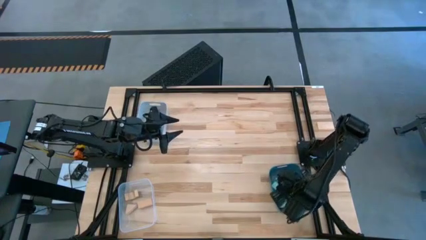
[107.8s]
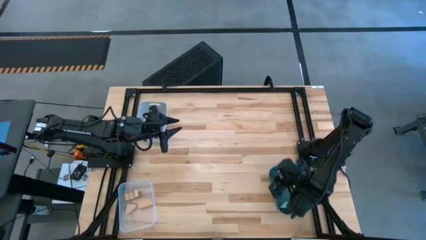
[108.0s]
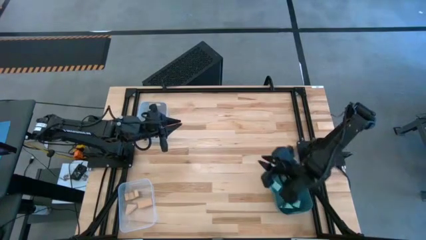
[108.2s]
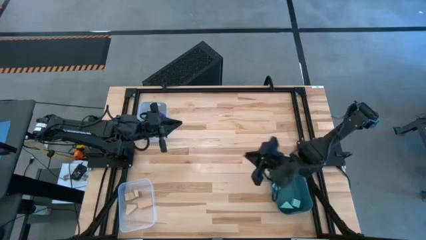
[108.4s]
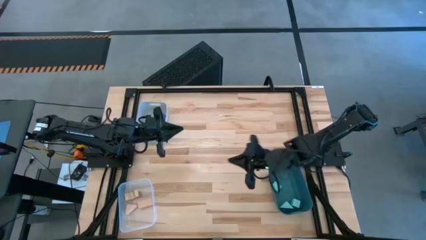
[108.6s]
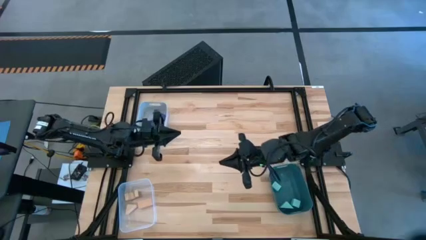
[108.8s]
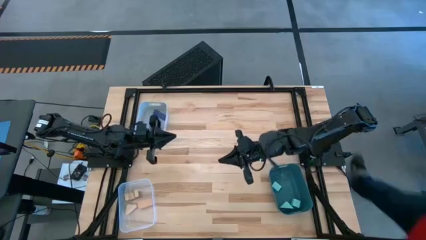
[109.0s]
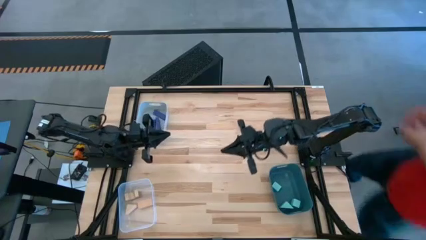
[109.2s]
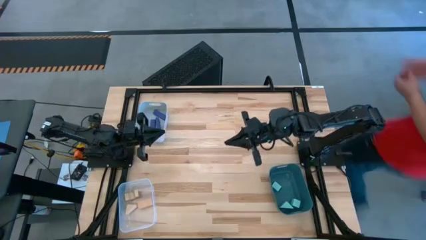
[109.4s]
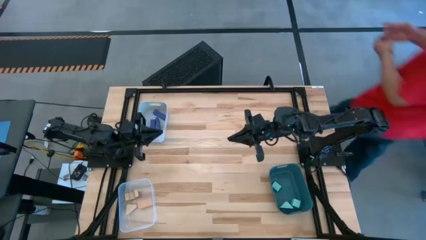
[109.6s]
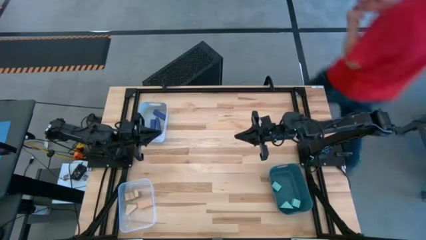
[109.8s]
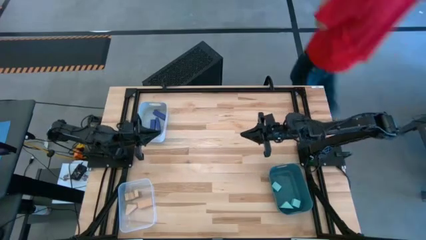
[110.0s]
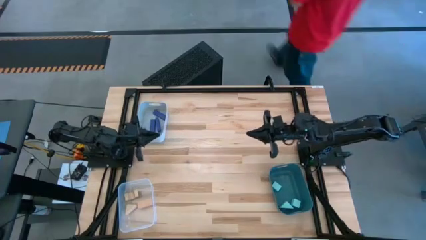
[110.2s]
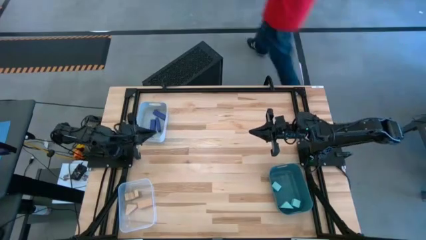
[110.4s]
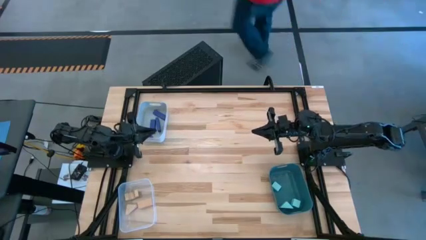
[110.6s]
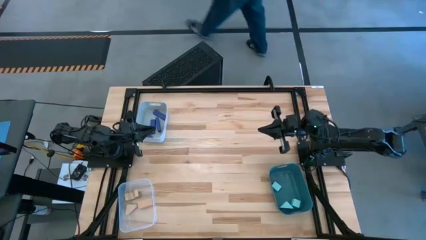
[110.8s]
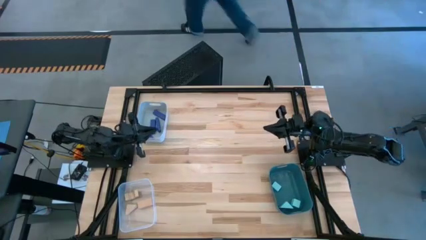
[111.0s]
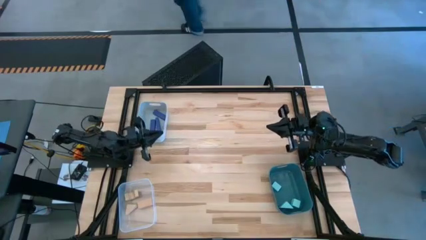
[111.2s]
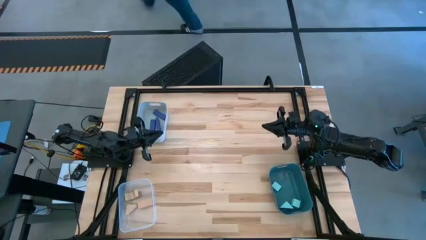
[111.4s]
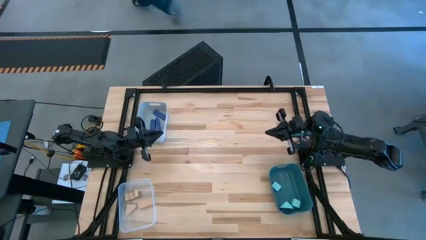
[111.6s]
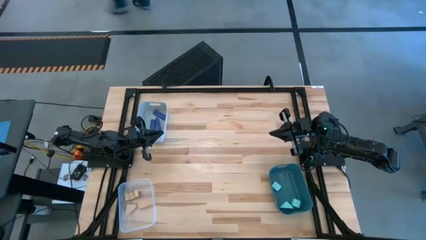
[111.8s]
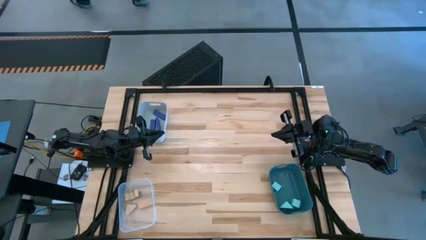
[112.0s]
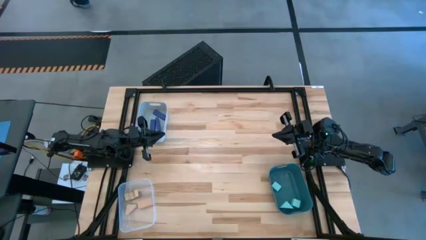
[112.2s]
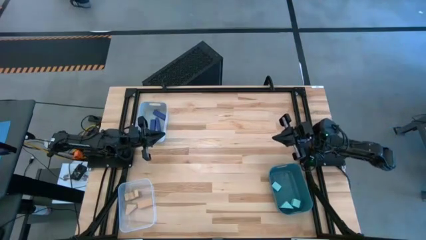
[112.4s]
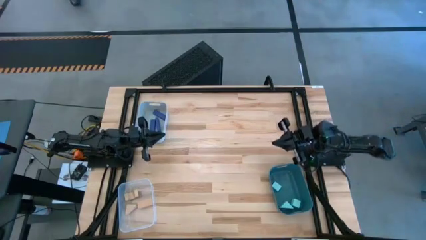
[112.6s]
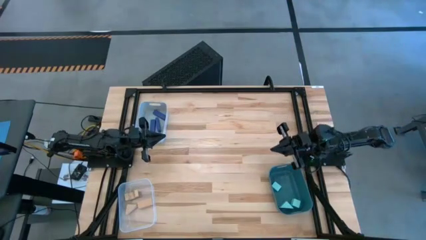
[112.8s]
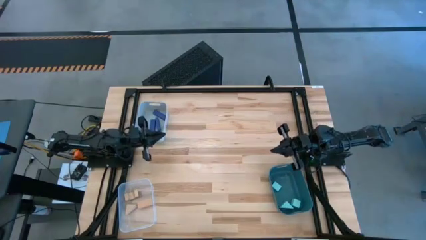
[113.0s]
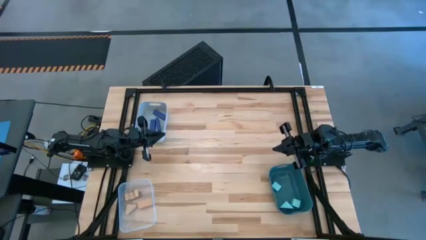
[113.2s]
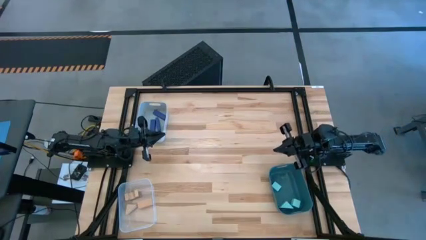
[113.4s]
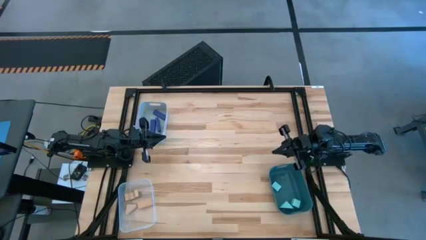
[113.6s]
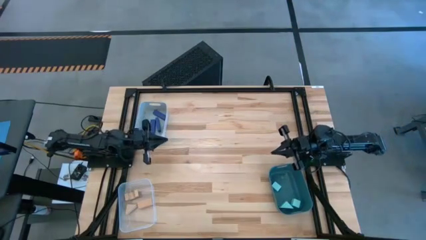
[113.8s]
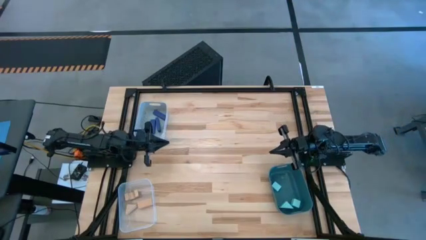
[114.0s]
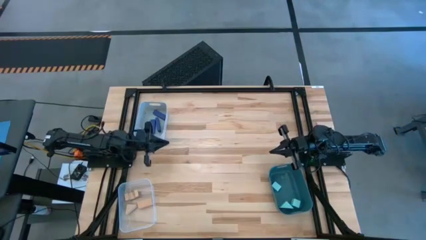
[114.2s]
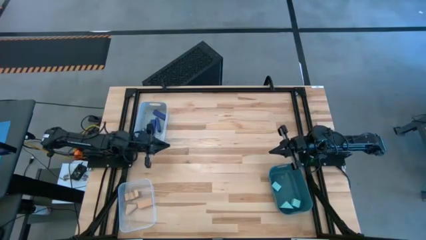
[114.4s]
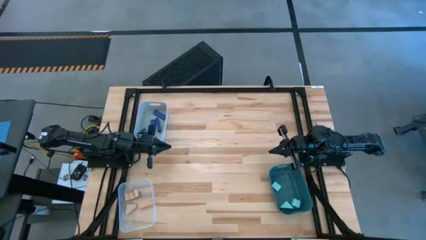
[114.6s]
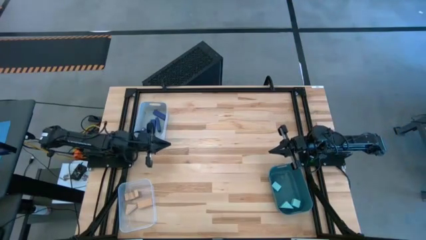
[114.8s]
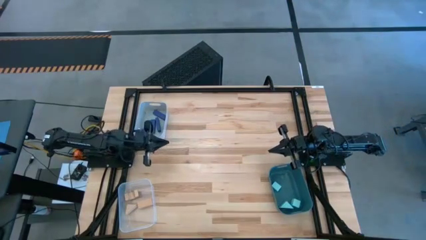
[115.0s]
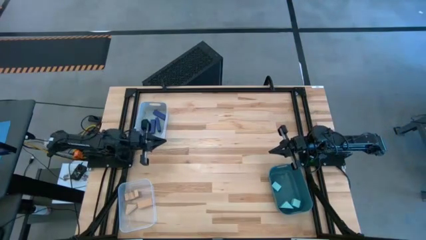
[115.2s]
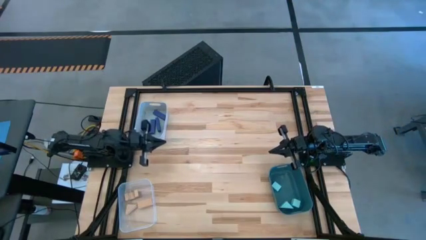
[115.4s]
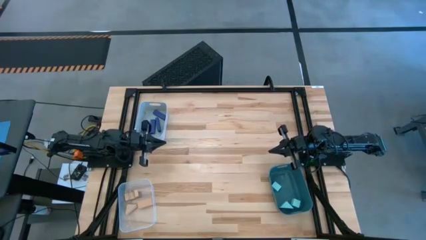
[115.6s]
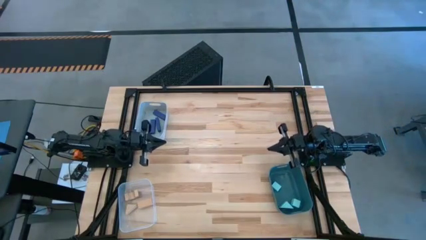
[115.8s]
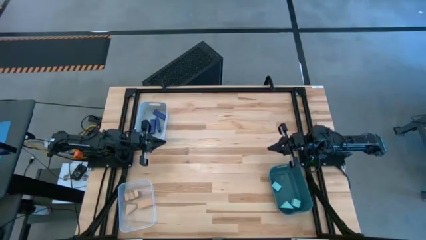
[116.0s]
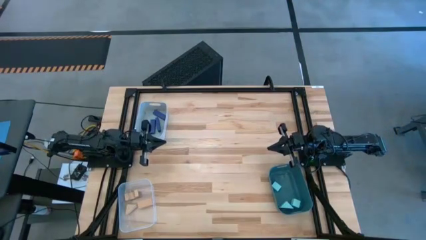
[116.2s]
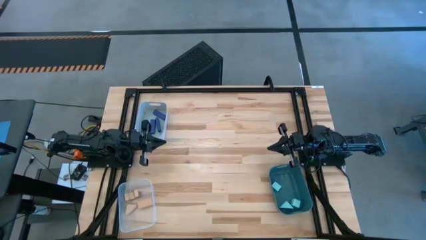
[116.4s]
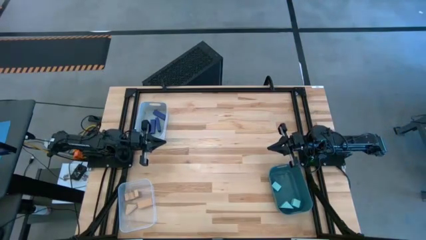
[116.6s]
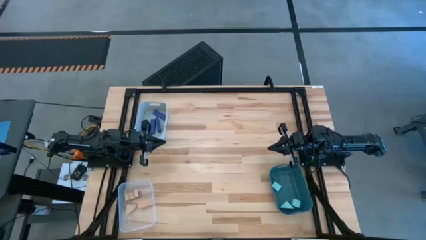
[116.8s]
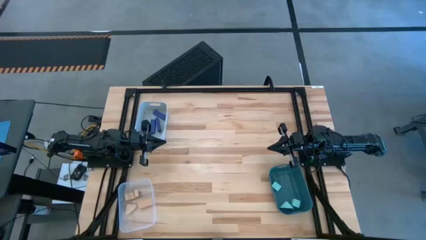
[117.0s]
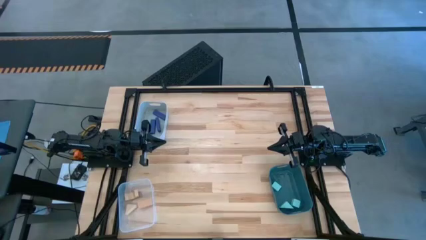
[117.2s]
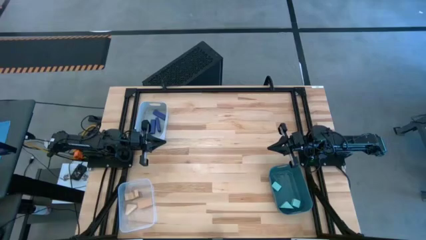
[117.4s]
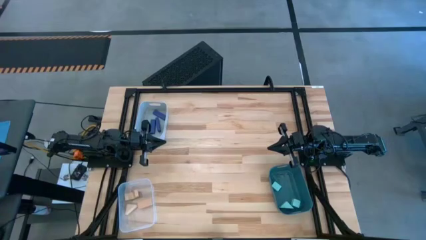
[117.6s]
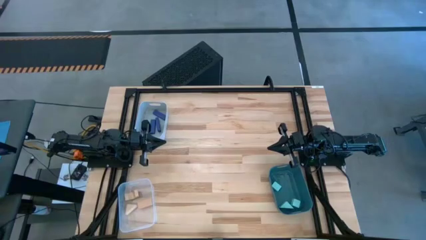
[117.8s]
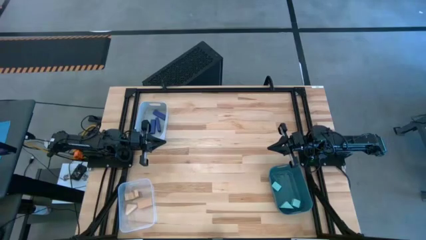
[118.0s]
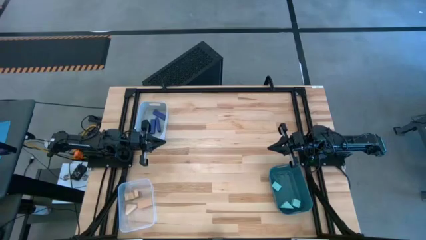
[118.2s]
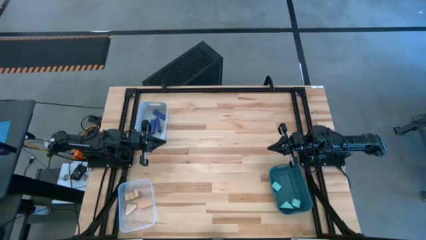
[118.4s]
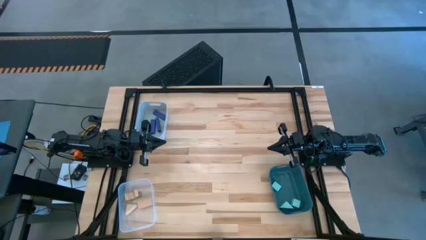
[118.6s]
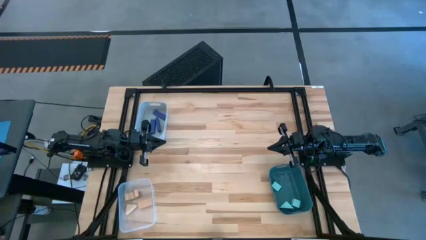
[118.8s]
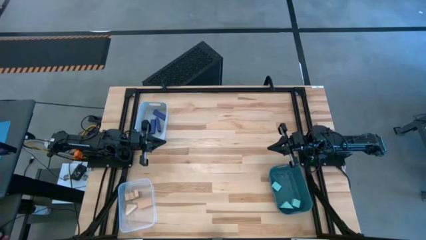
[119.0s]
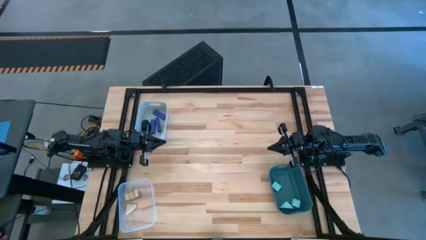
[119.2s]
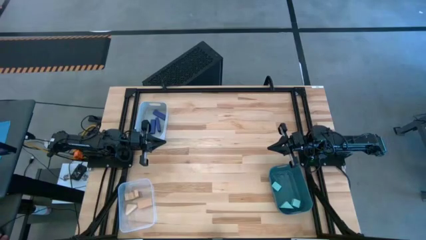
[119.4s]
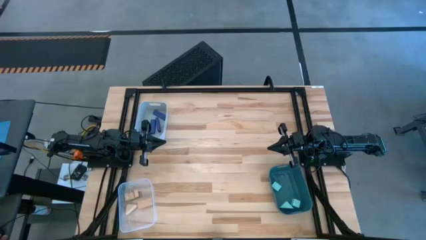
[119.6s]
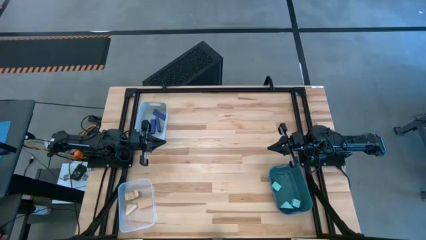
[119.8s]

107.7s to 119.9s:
Task: Sort & place blocks by color
Return to Home Position

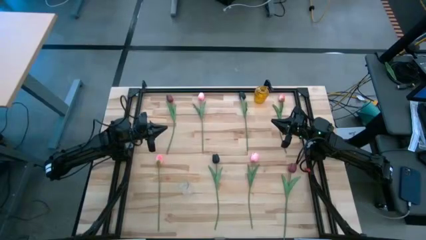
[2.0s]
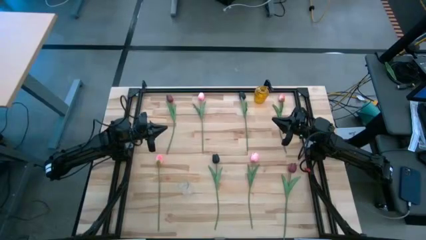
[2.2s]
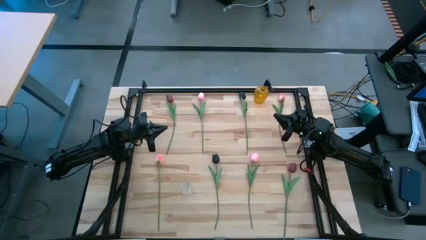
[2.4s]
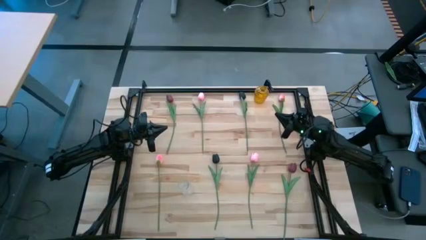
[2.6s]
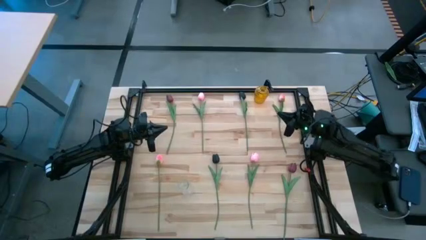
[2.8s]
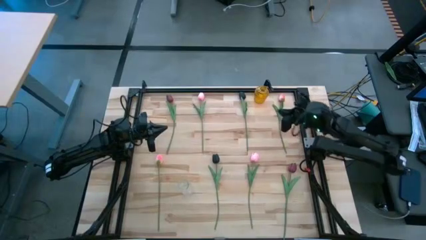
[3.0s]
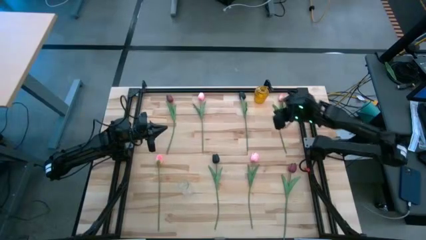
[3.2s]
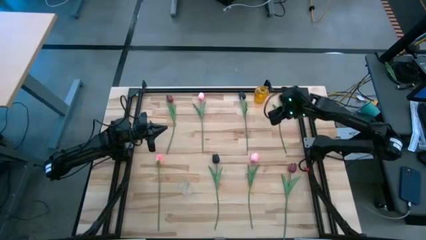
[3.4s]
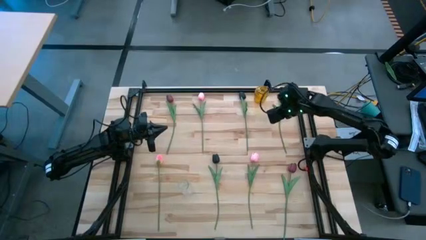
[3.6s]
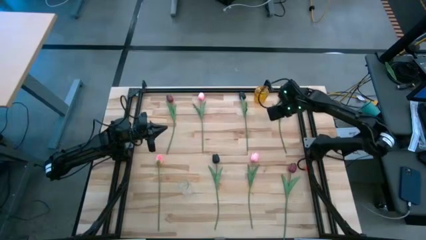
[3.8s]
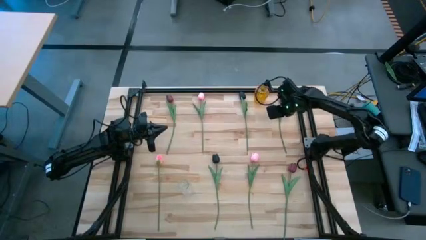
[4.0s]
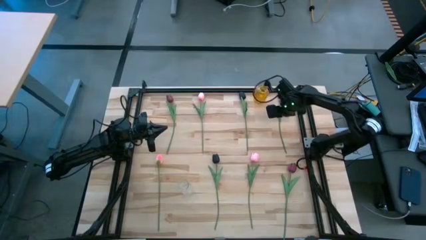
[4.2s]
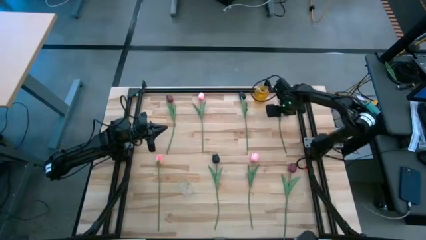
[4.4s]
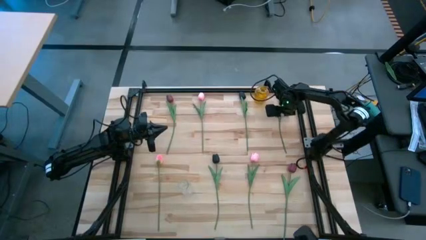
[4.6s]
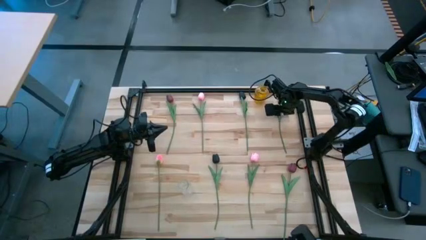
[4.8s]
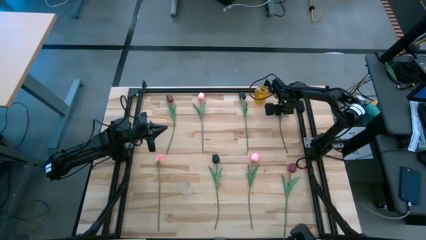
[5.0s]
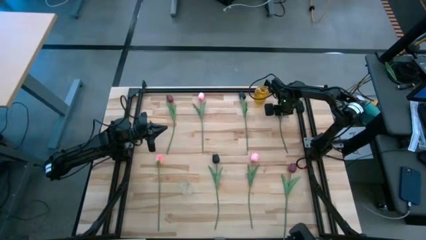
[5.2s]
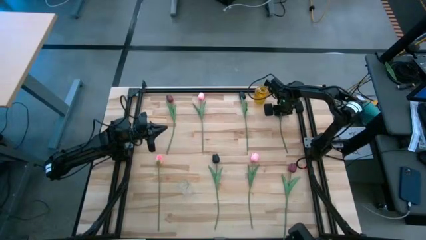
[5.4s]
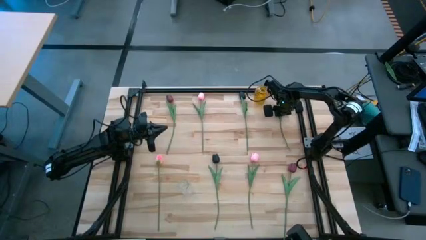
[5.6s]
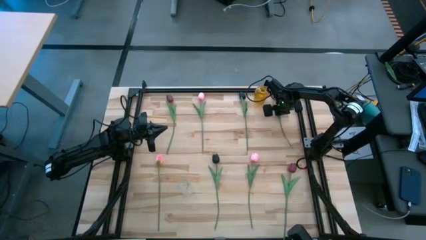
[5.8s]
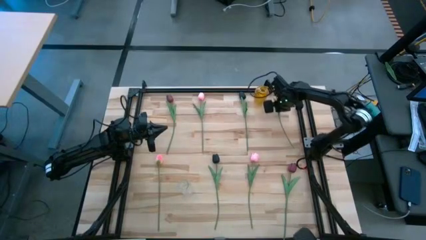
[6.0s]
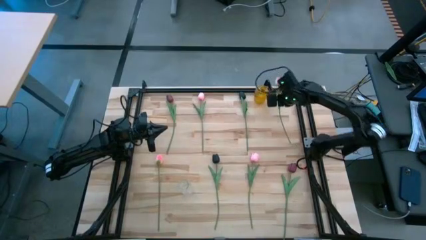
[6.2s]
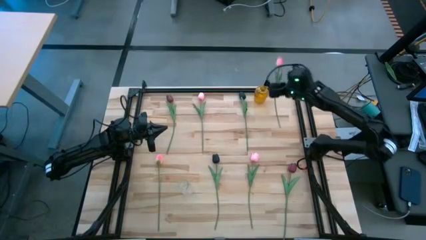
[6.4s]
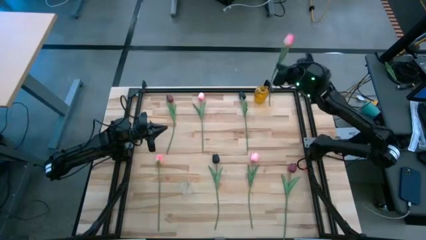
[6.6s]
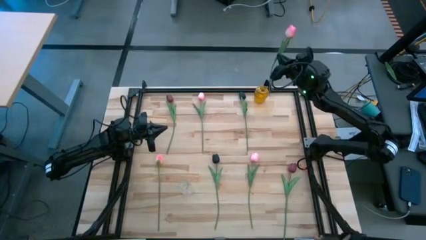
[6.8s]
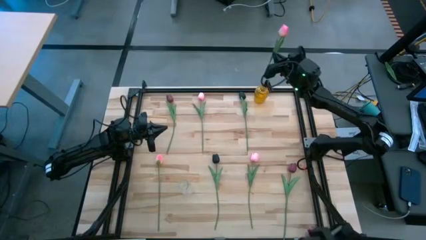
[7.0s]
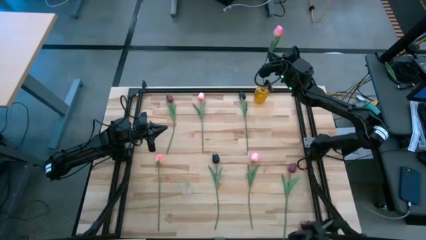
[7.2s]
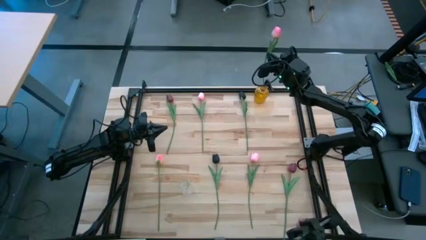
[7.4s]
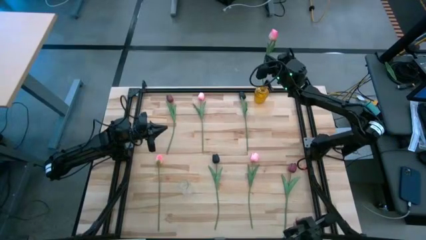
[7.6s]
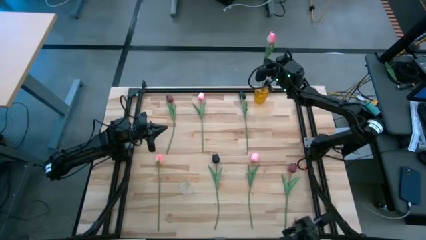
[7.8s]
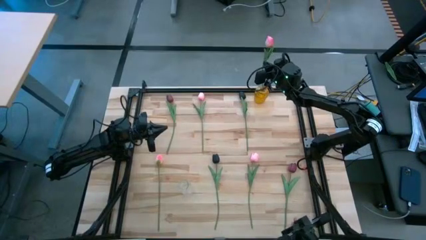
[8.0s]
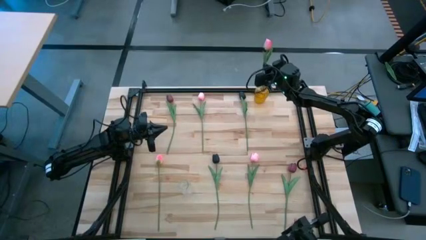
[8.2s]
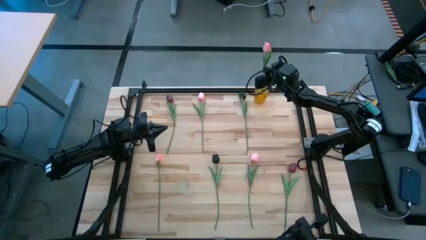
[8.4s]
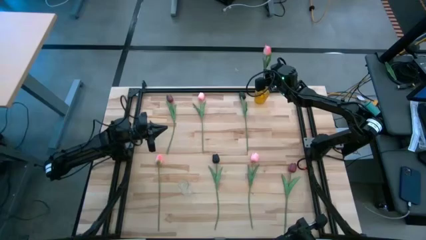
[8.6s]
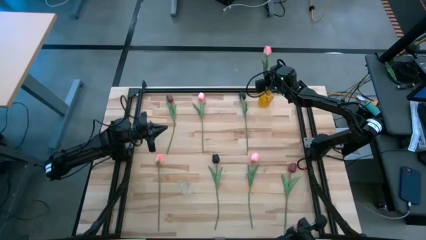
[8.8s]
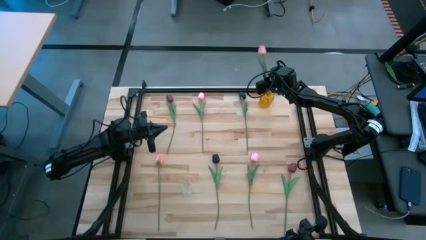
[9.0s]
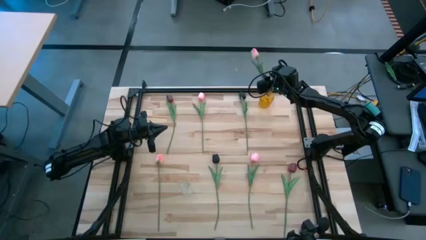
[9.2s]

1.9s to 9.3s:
Task: Sort flowers into vase by color
Put the top right pink tulip flower into the yellow crystal vase
